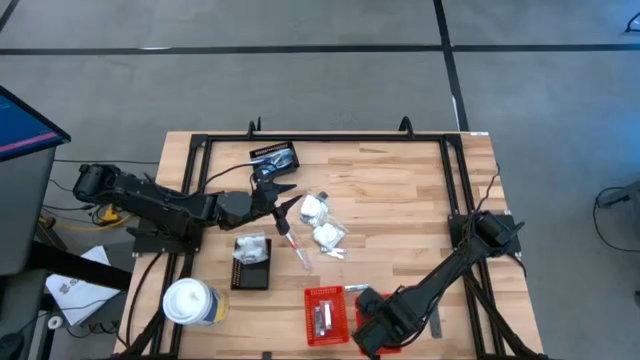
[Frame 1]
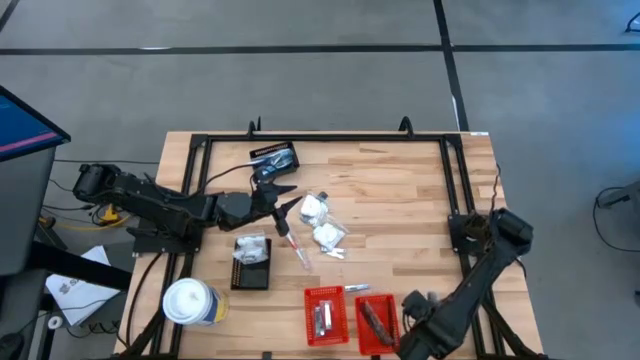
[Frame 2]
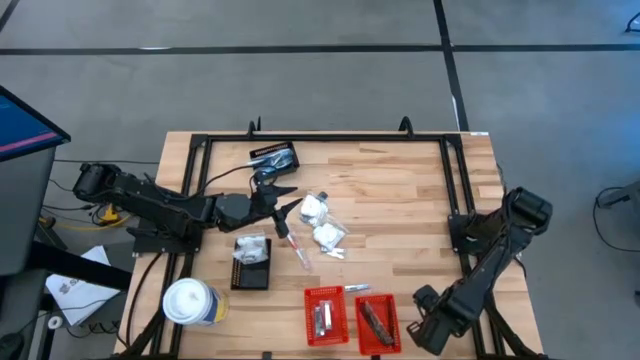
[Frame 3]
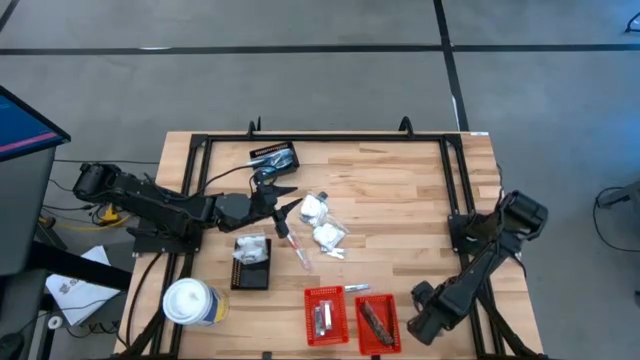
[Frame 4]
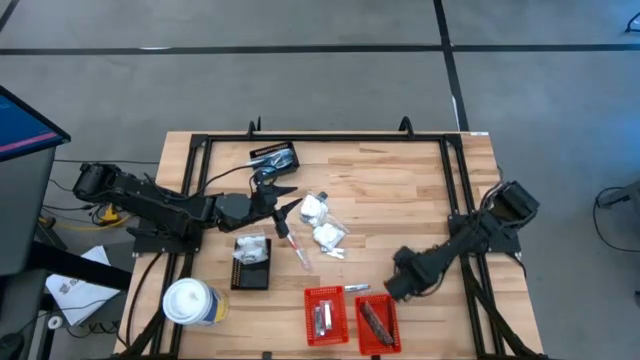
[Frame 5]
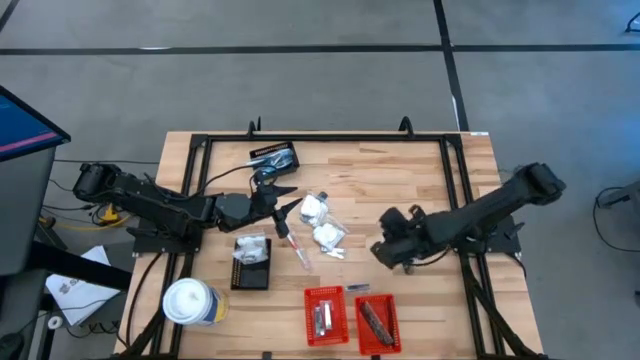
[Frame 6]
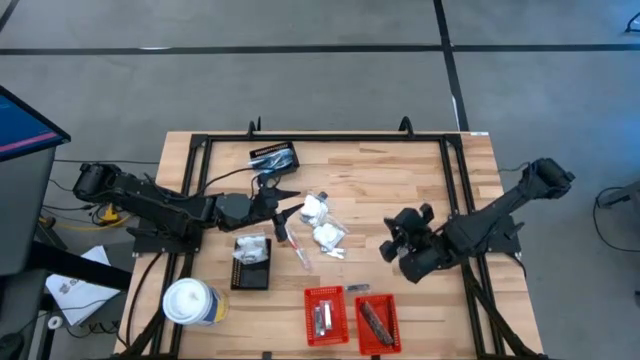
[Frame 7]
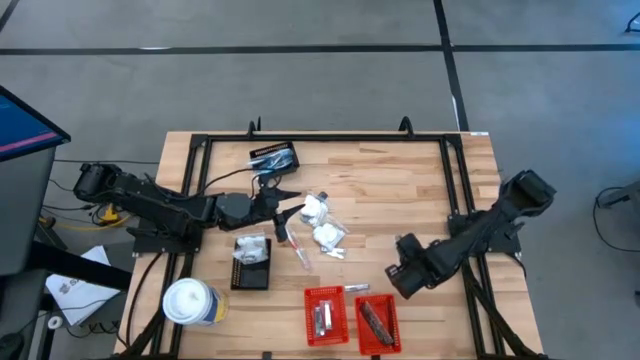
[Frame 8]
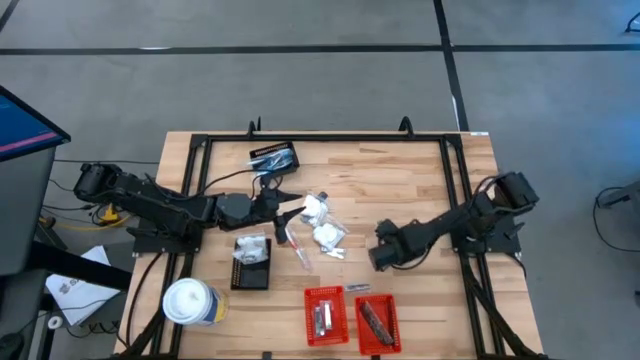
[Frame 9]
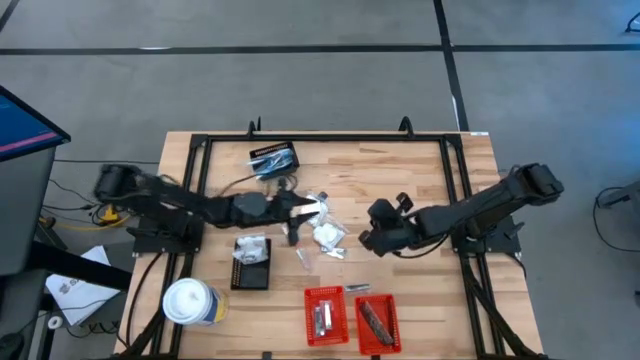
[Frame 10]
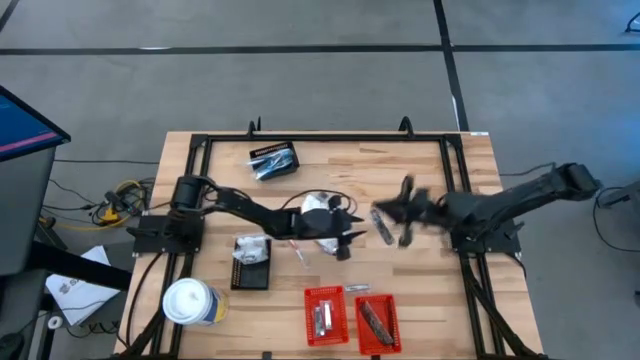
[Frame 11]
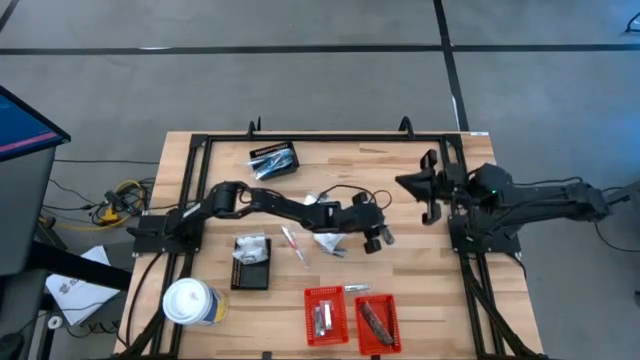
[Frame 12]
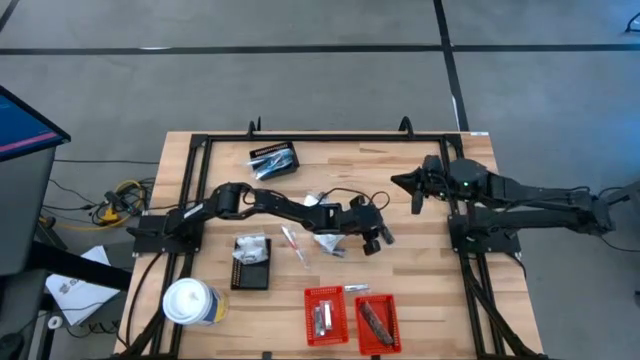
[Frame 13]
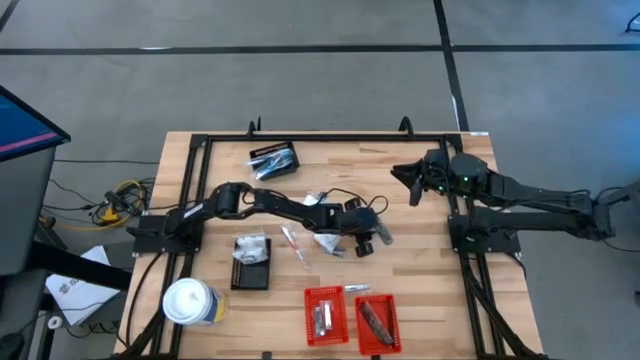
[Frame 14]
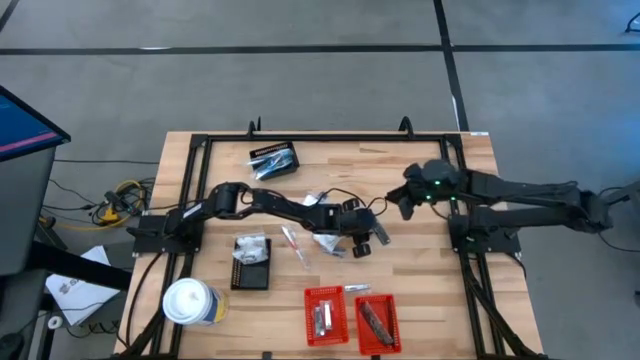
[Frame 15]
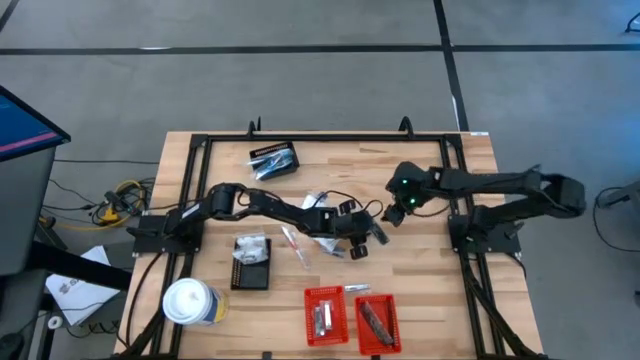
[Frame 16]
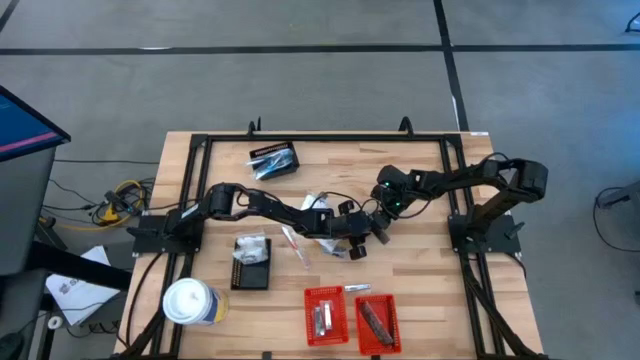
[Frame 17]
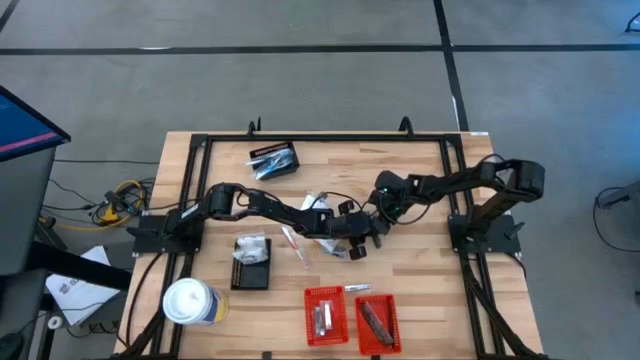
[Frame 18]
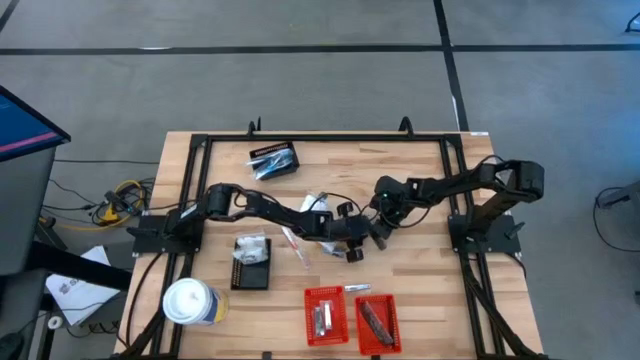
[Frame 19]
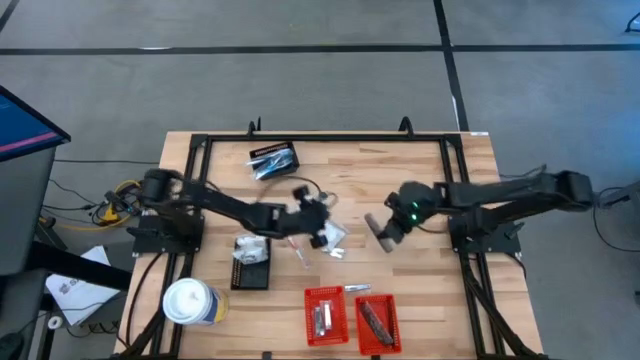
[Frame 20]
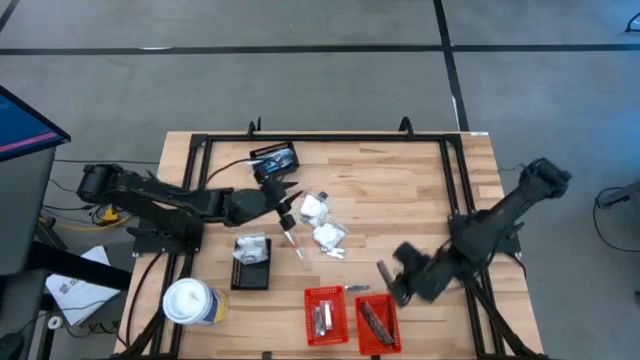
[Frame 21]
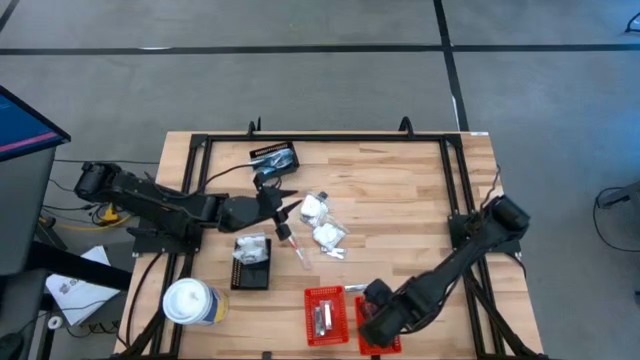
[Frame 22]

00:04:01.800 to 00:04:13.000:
Task: Pick & Place Travel size toiletries
Put the black hair brush into the right red bin

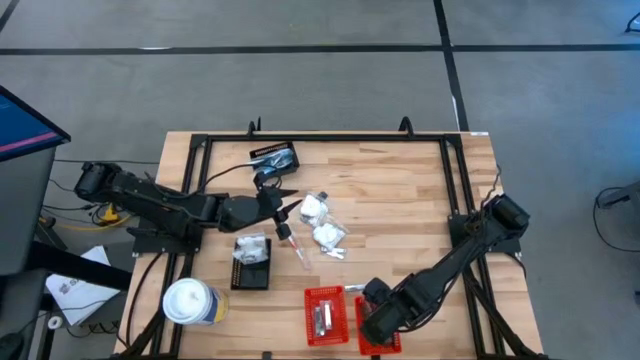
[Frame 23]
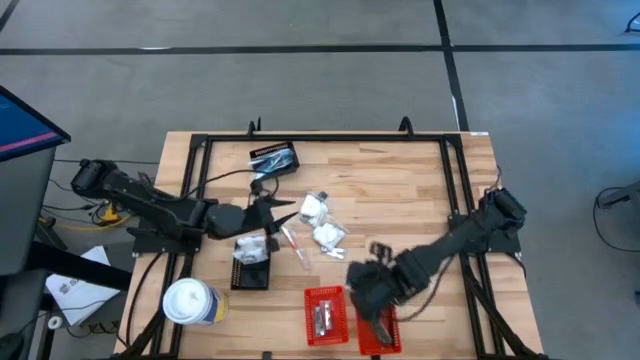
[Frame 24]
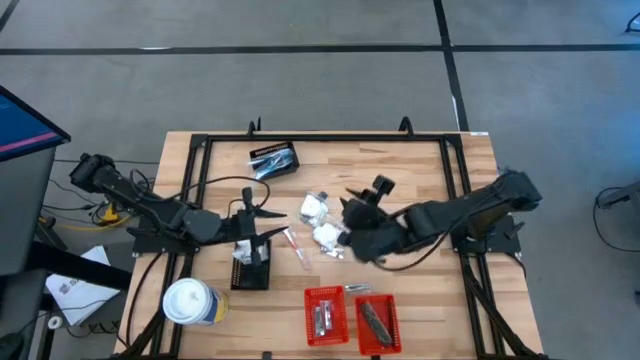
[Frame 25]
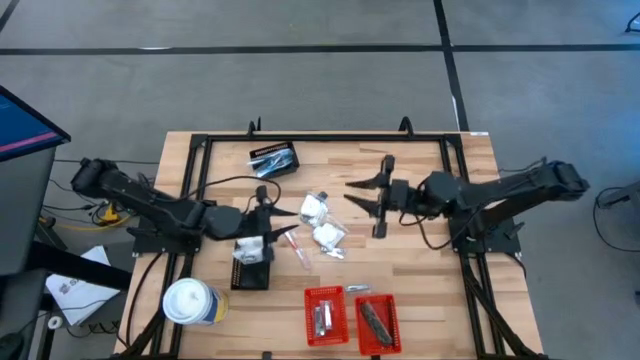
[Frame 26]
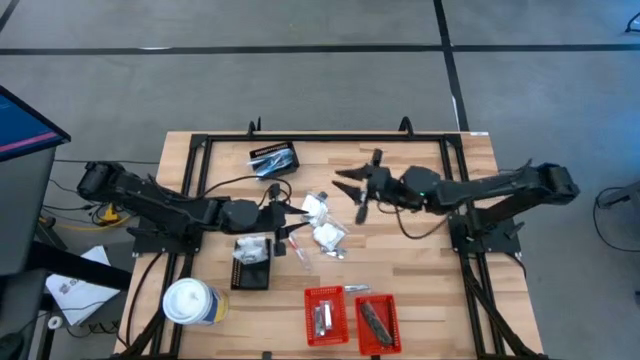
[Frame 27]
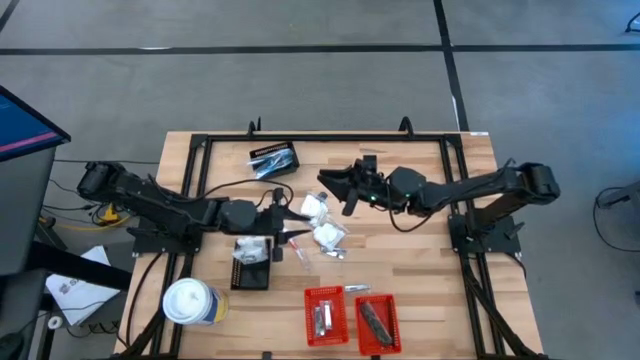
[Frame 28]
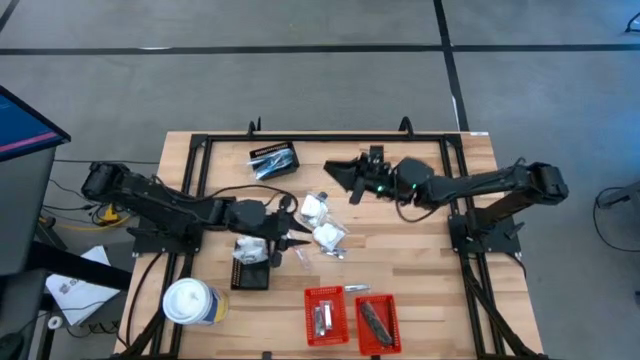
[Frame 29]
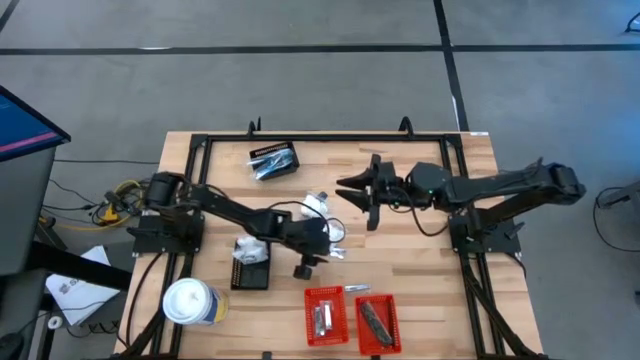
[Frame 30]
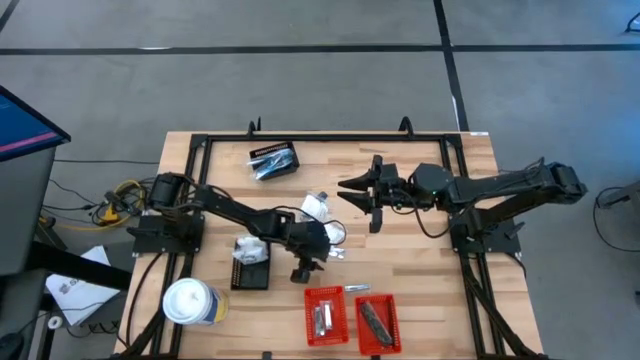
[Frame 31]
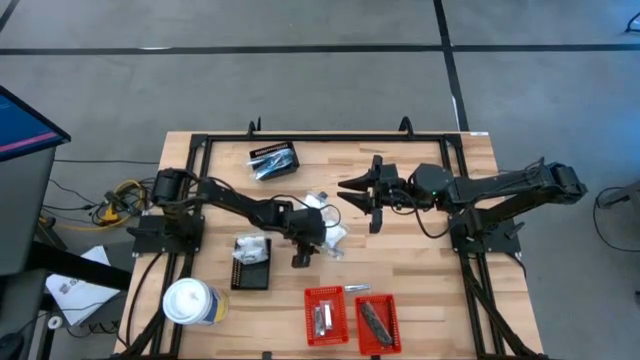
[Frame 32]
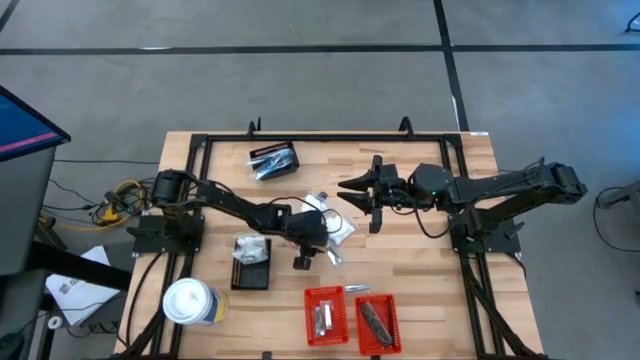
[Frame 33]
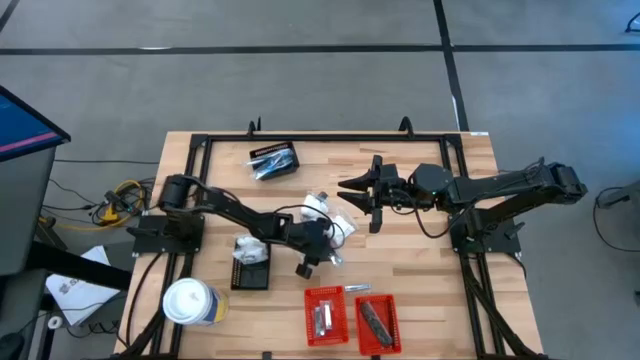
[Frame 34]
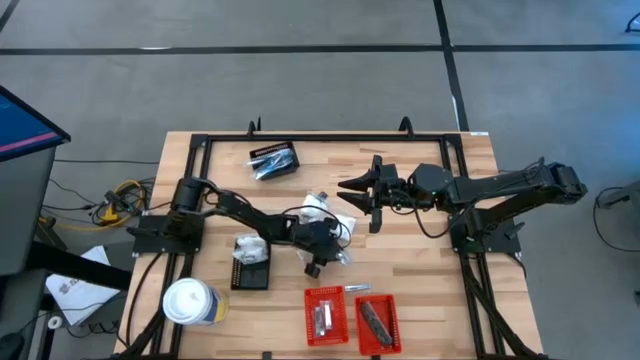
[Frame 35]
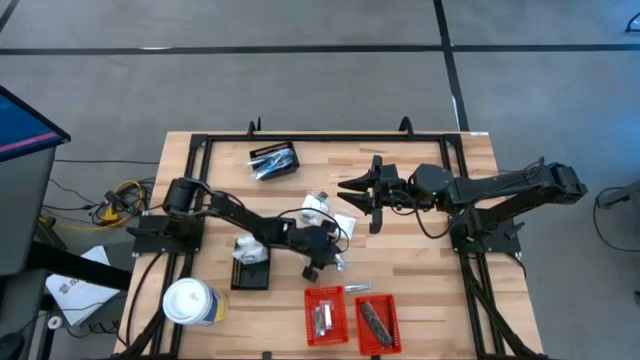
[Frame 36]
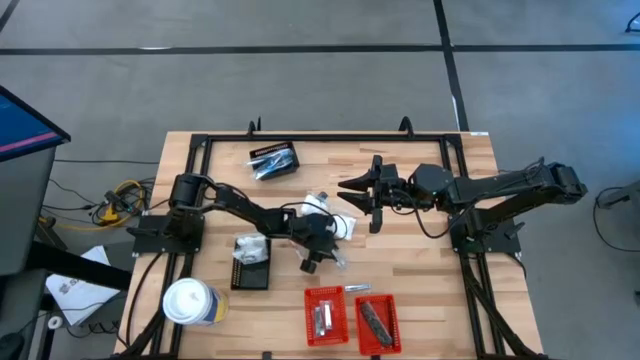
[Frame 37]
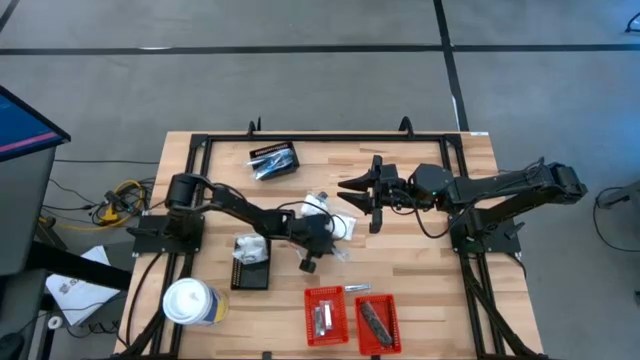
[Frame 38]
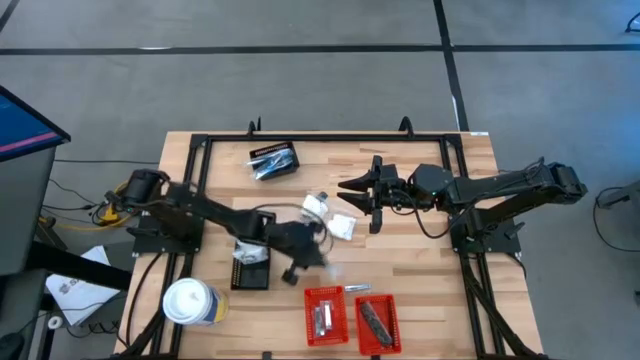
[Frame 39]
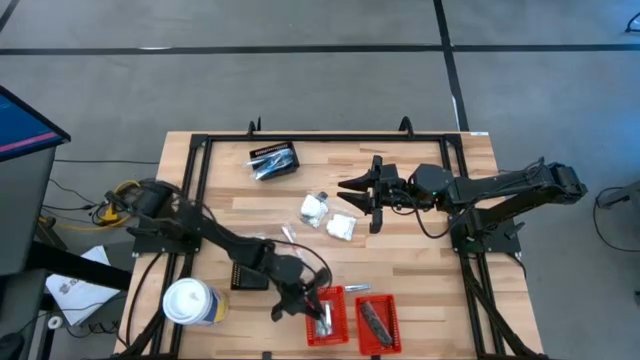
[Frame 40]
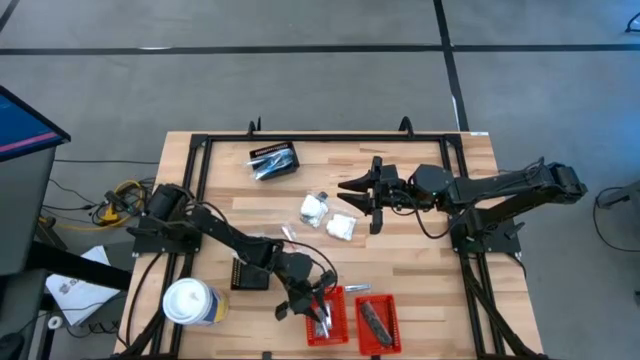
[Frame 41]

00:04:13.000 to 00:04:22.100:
Put the nail cutter into the left red bin

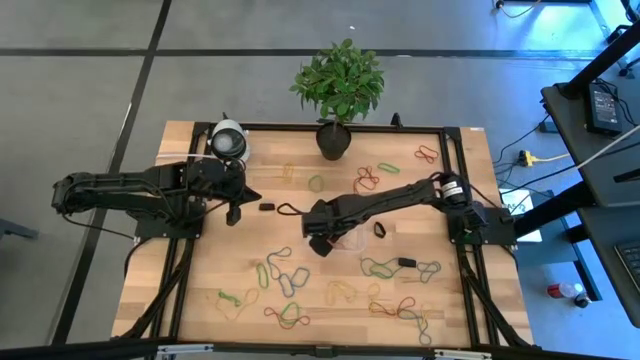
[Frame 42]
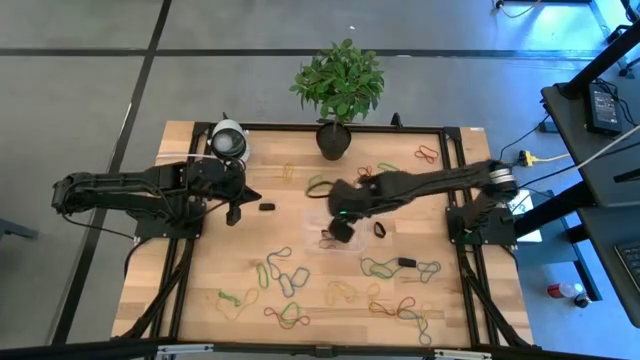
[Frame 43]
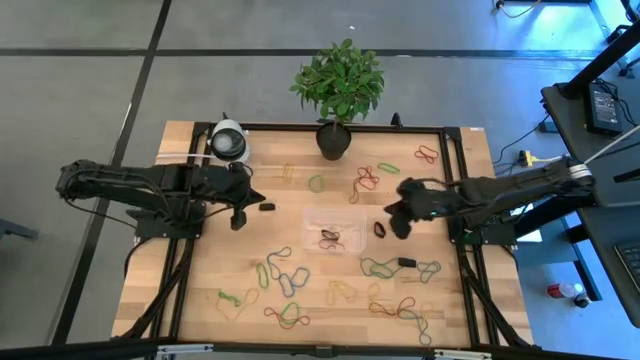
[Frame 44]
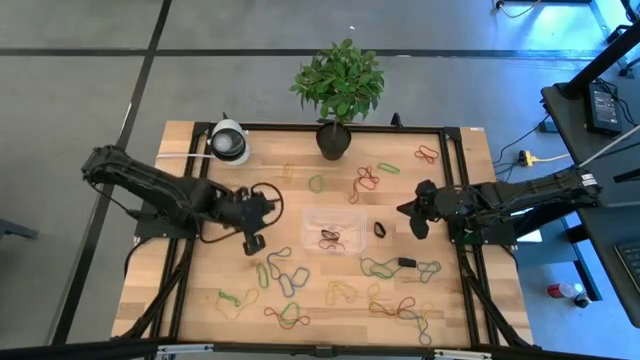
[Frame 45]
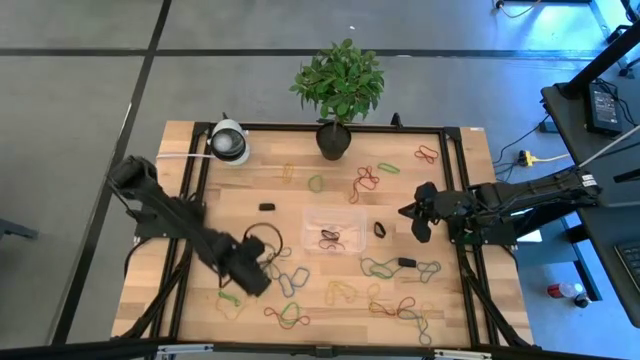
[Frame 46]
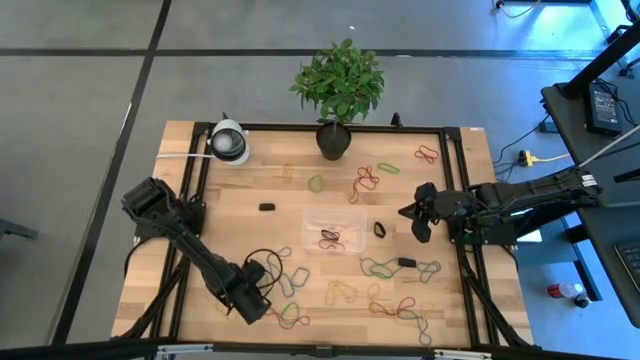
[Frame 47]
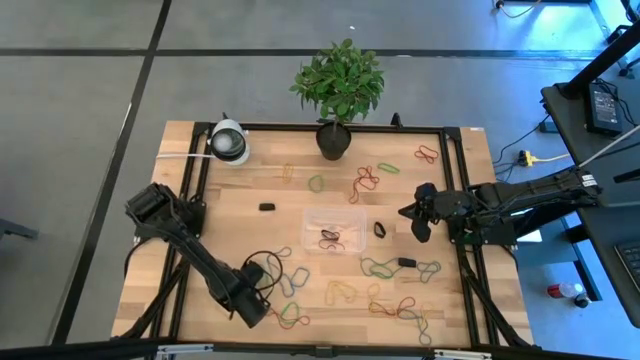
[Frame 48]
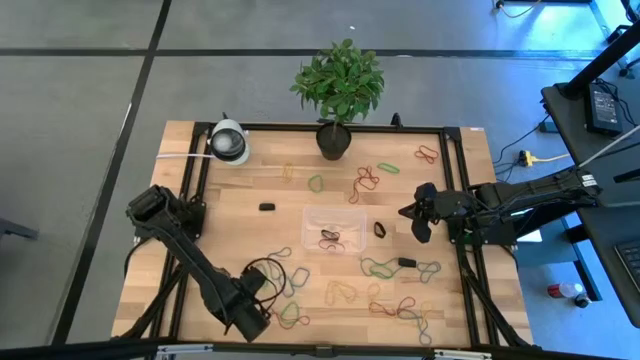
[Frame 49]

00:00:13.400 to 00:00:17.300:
Task: Pick and place rubber bands into bin
Put the yellow rubber band into the bin
